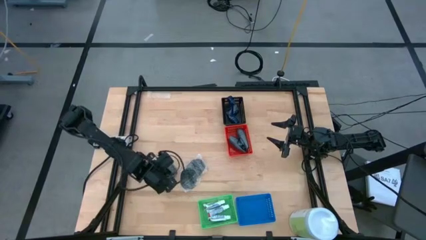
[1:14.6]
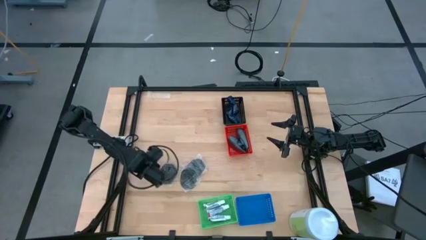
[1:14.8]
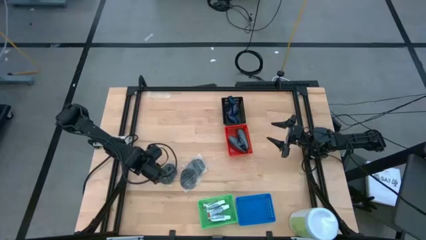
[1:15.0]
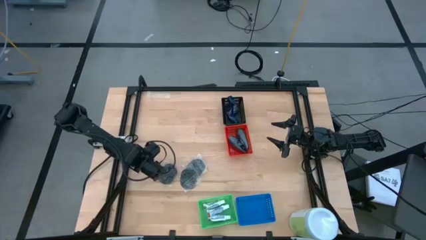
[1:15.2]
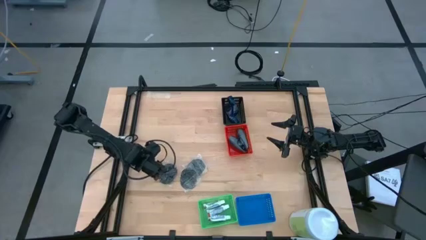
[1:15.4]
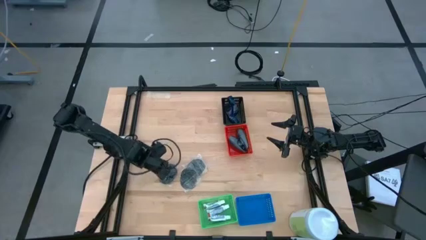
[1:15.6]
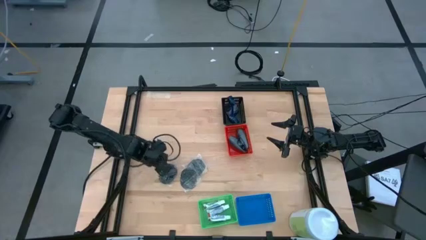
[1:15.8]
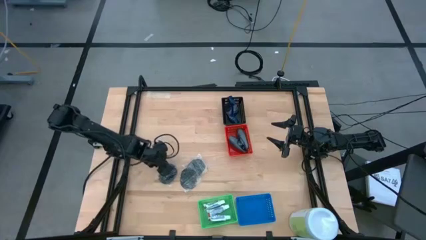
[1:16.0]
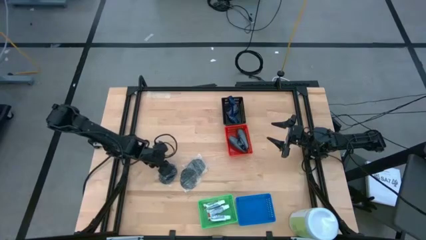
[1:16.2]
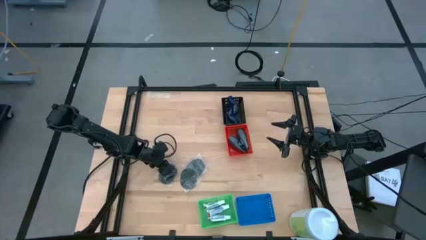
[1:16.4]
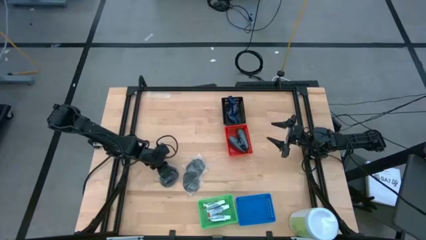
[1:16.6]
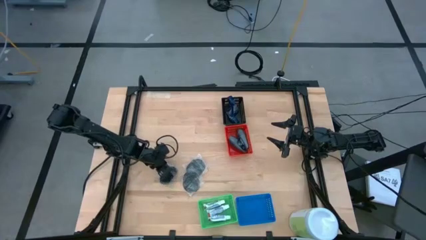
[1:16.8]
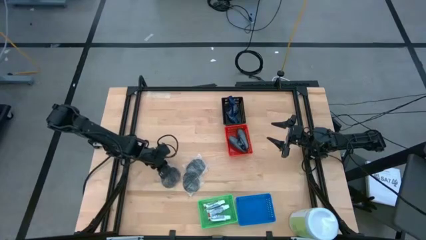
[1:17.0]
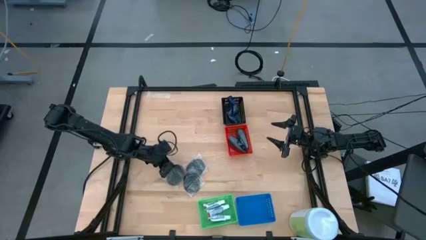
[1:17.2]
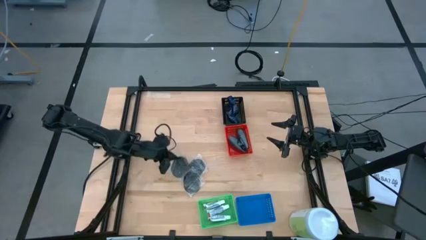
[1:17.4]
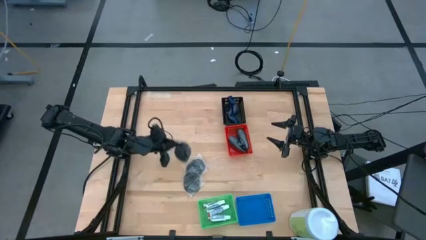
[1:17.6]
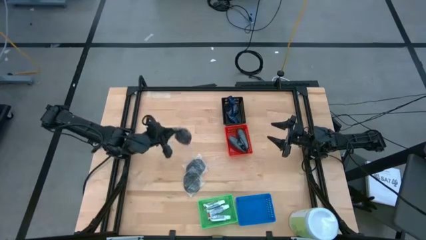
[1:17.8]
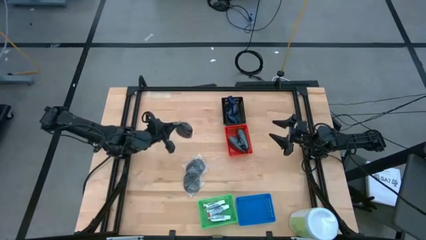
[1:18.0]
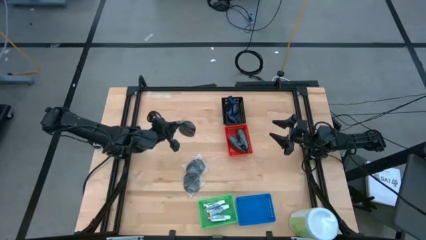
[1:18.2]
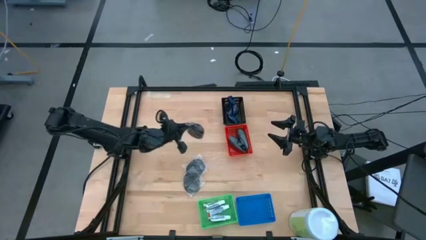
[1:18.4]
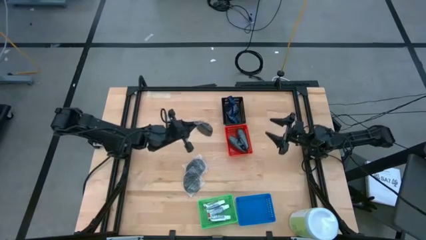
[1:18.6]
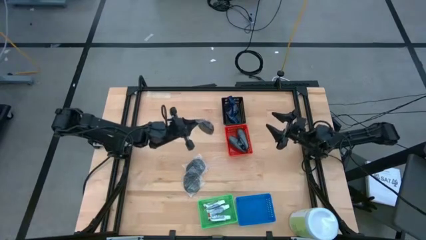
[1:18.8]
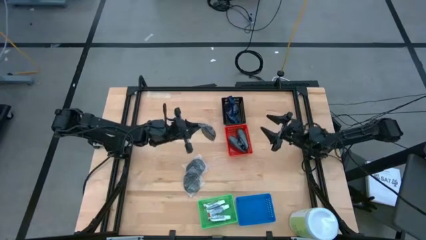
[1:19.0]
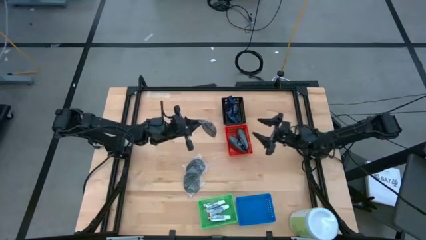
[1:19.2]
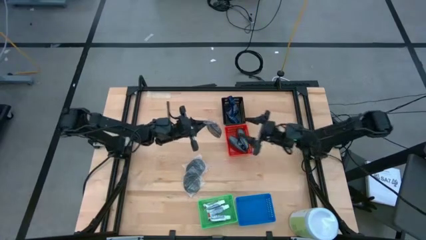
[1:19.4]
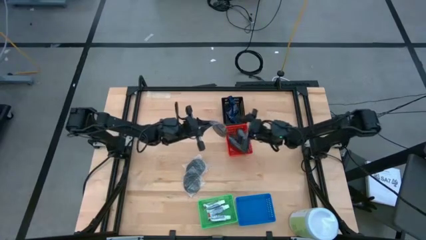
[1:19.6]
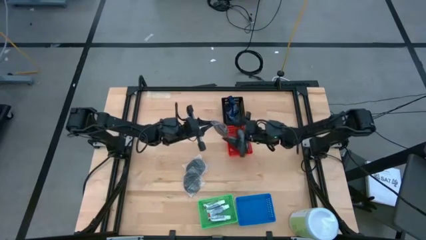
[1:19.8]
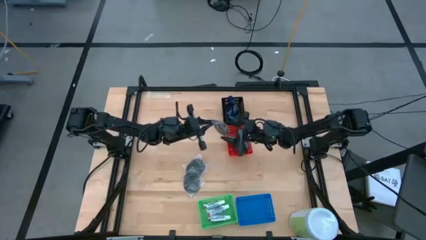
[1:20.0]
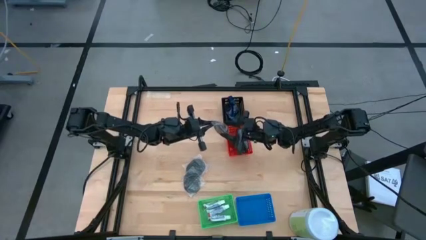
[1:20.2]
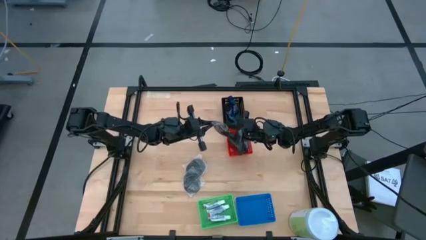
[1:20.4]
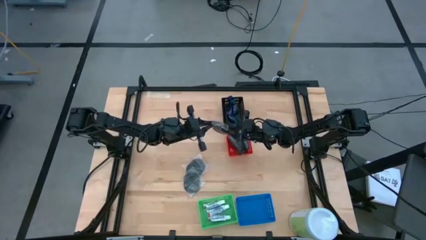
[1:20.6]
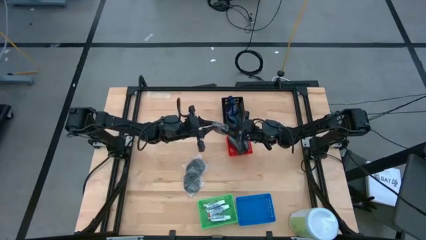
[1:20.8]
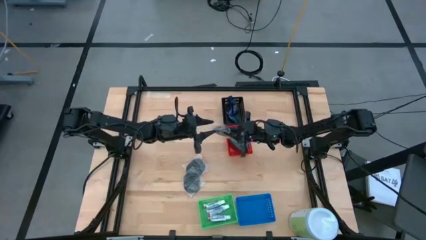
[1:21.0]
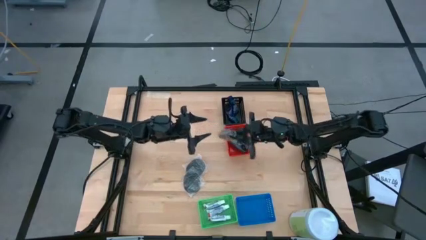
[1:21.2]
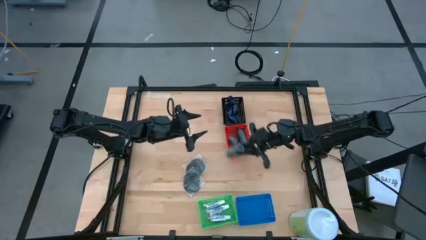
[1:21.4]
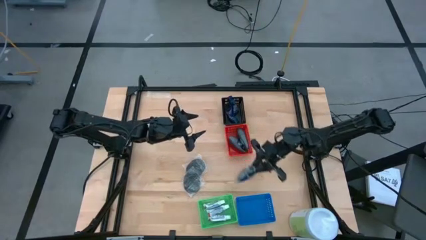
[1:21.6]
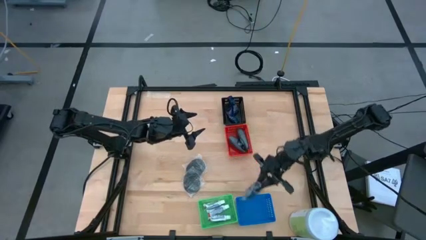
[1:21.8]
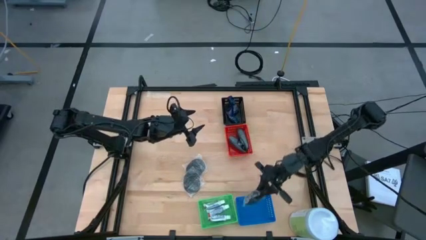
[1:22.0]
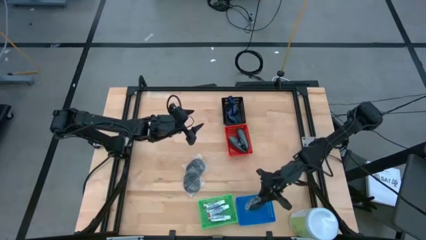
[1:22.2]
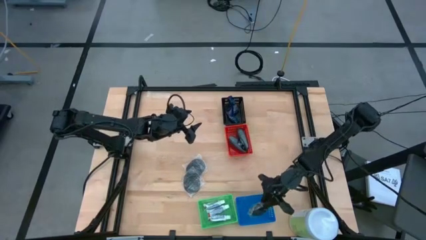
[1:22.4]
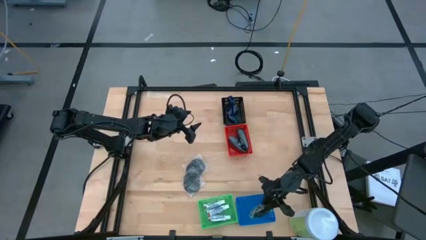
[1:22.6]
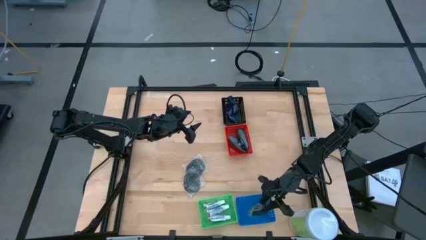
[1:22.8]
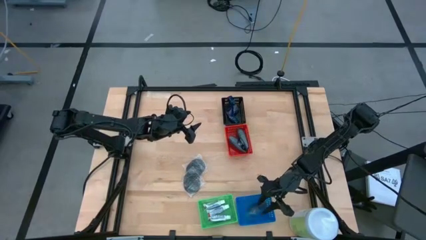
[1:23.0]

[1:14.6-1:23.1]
Task: Pick & Place Travel size toiletries
Put the left black hairbrush into the blue bin

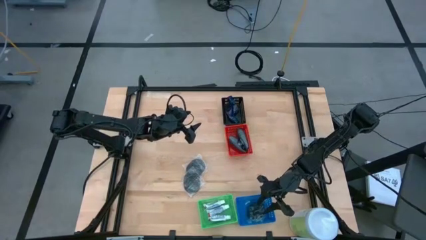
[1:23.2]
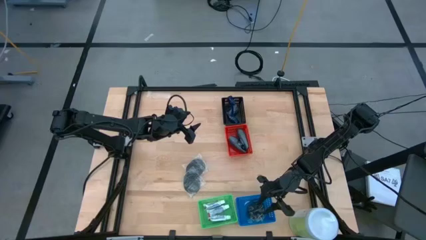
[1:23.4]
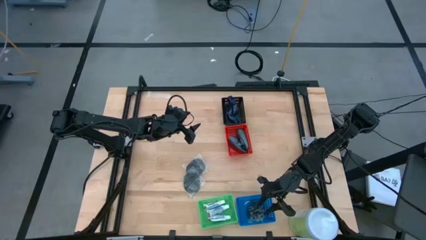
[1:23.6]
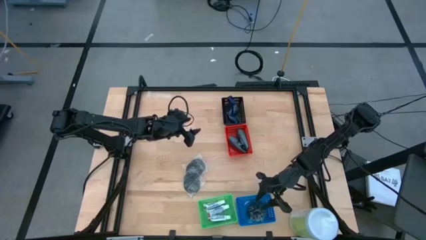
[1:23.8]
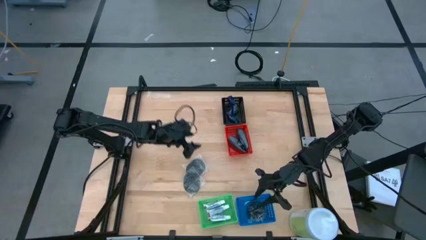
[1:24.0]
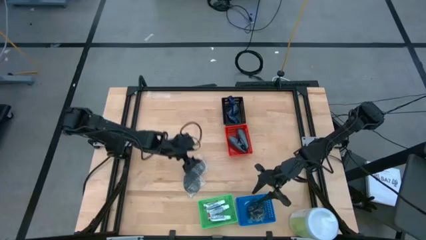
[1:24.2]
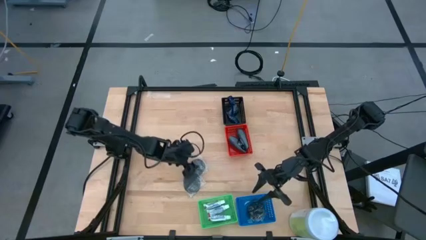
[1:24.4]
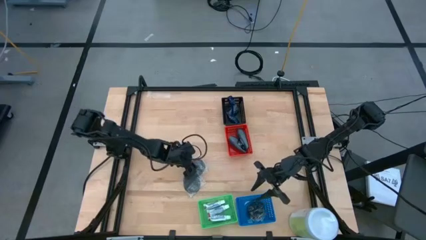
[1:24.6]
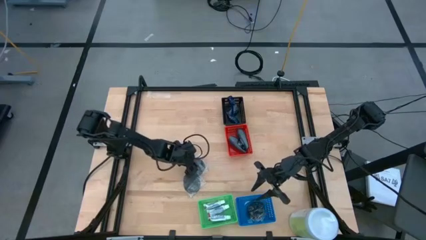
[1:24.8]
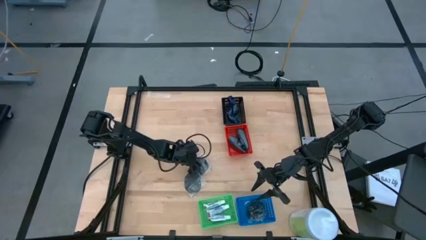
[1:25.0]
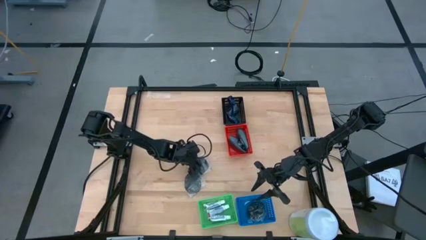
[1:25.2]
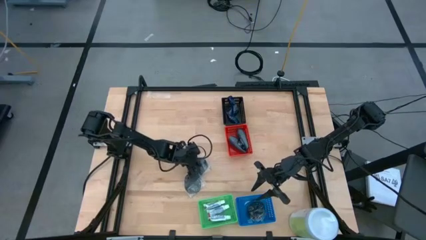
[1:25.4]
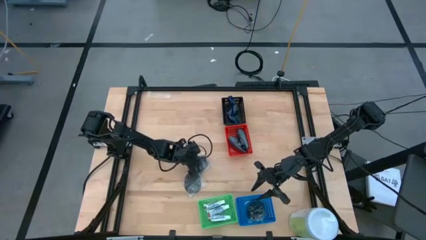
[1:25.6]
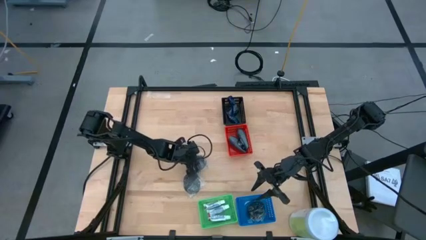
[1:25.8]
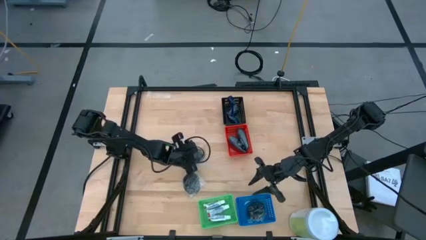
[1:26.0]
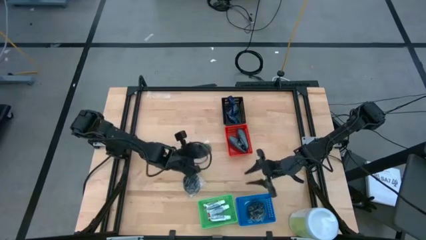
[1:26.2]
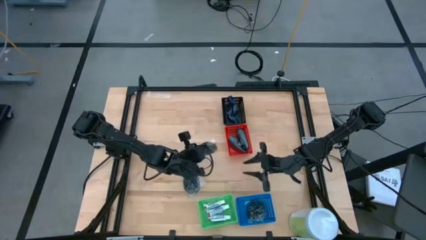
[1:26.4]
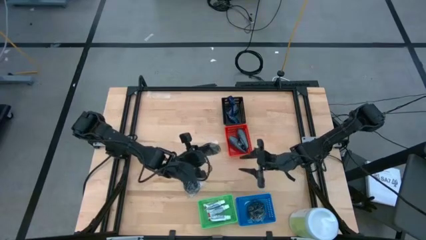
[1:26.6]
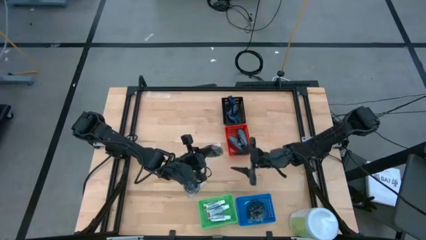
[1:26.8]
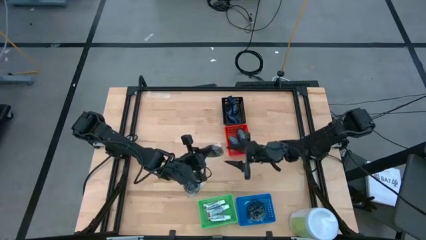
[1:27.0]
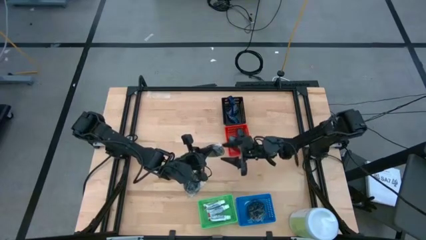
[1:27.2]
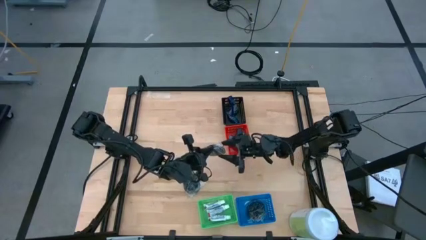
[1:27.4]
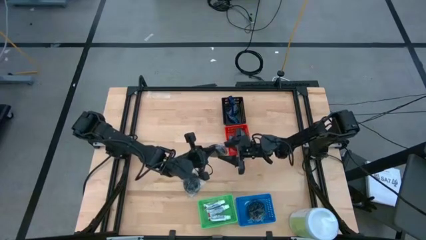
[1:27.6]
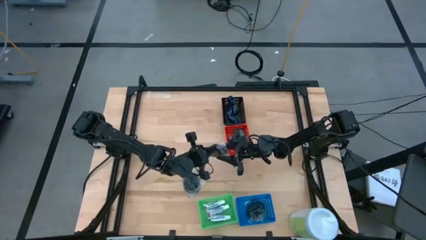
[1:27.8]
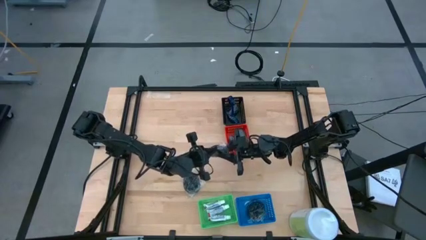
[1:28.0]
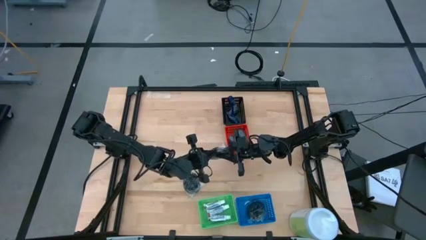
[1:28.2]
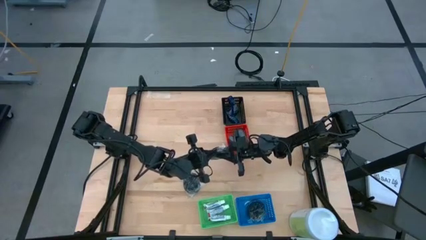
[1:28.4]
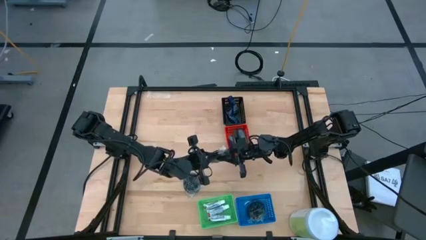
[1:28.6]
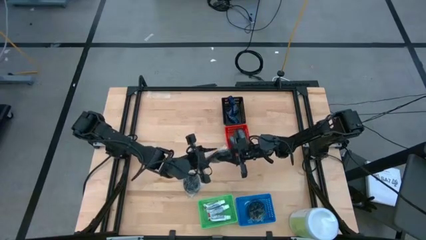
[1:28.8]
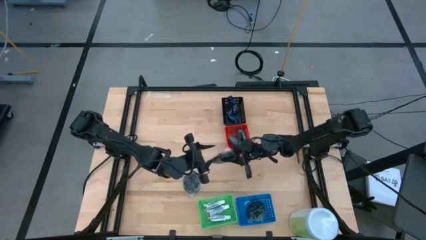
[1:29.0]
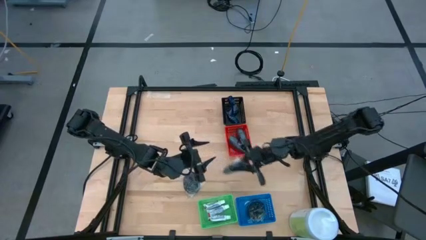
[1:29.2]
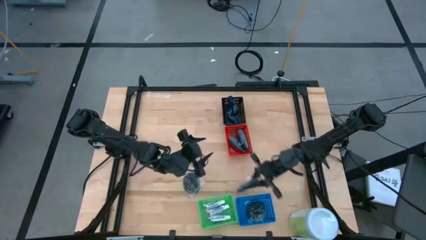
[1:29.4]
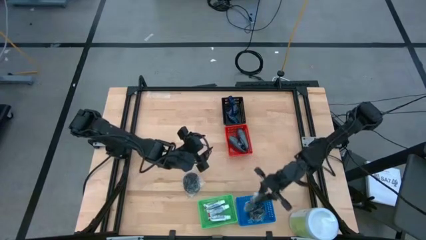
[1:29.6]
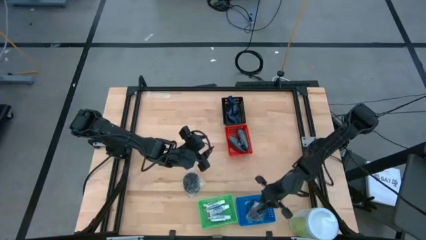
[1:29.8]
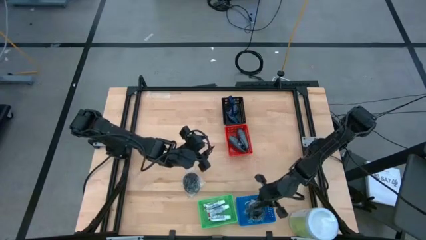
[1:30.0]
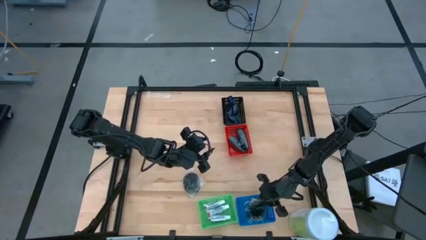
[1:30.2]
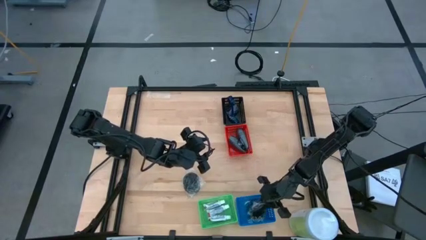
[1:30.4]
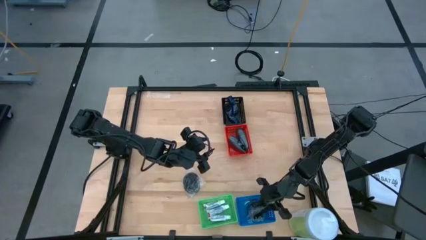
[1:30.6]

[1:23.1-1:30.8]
Put the top black hairbrush into the blue bin
